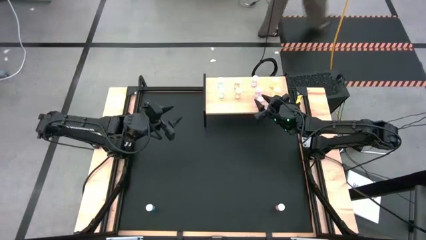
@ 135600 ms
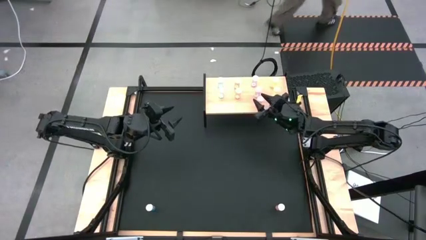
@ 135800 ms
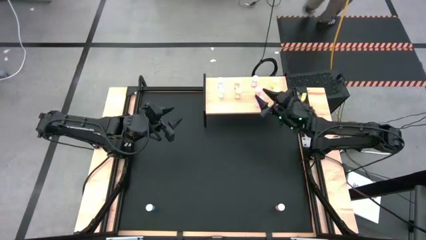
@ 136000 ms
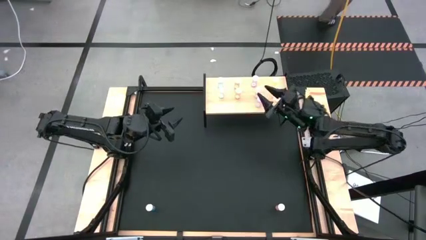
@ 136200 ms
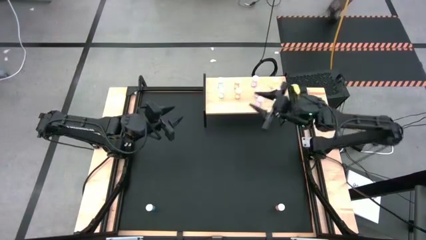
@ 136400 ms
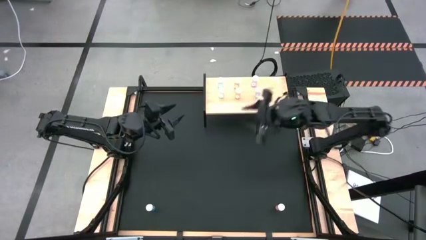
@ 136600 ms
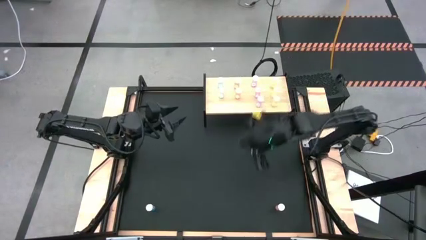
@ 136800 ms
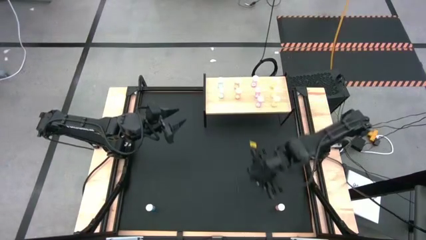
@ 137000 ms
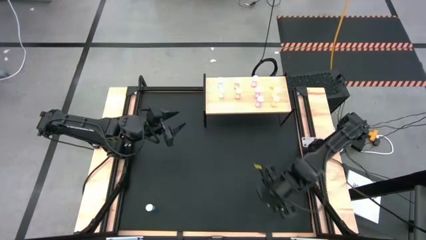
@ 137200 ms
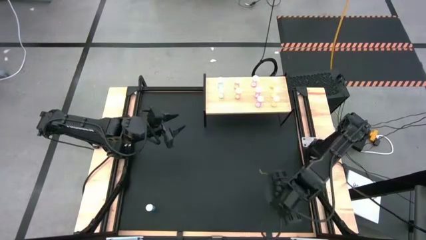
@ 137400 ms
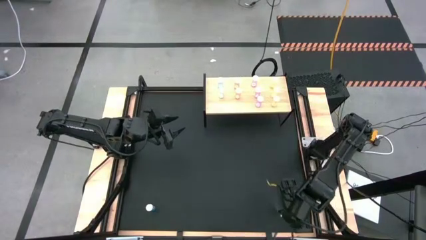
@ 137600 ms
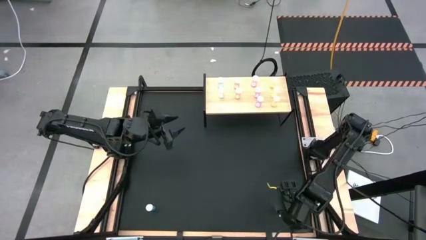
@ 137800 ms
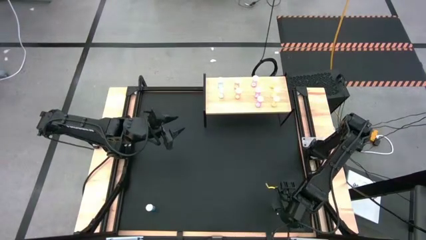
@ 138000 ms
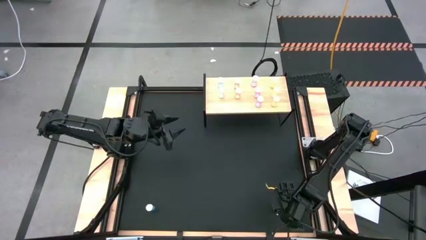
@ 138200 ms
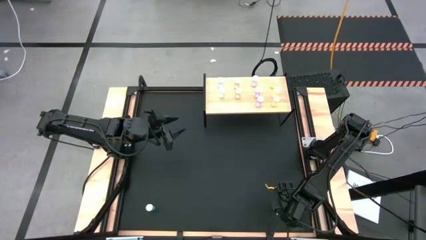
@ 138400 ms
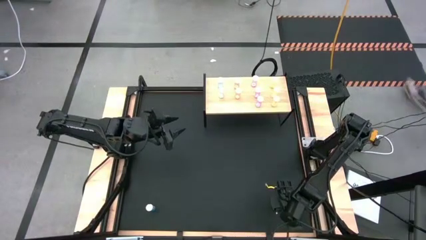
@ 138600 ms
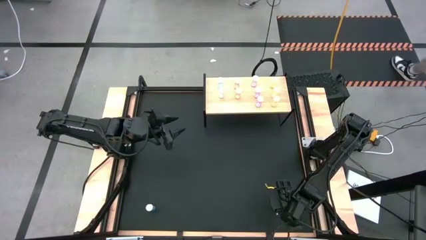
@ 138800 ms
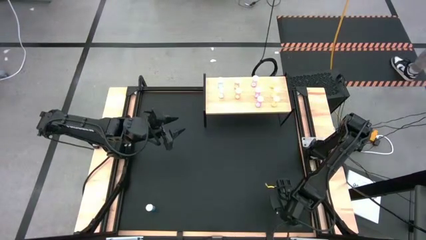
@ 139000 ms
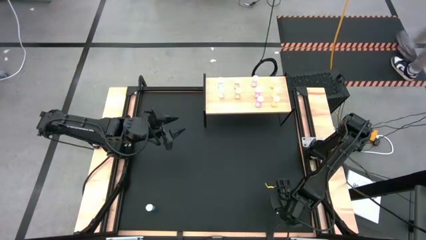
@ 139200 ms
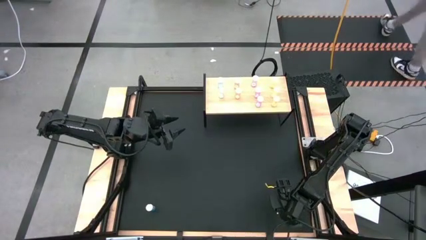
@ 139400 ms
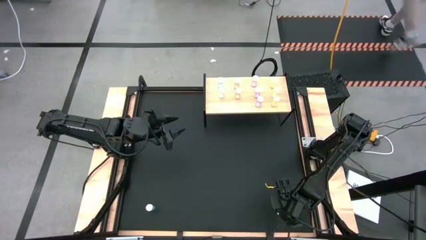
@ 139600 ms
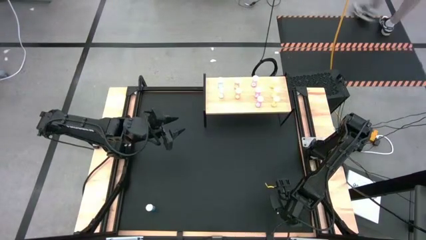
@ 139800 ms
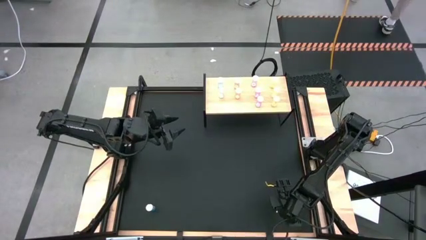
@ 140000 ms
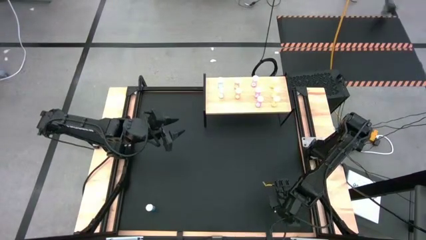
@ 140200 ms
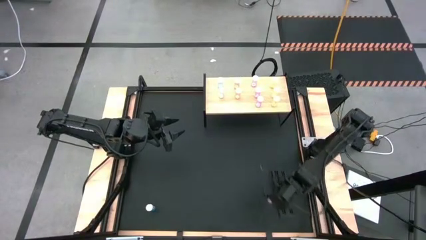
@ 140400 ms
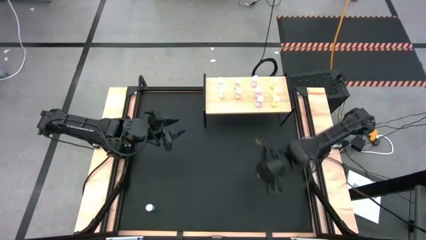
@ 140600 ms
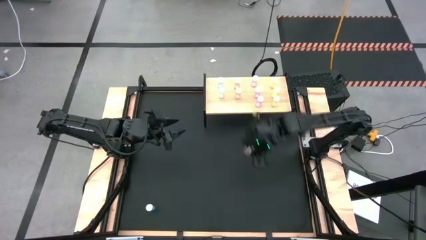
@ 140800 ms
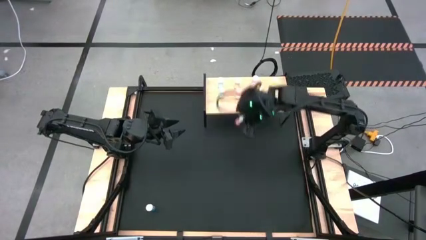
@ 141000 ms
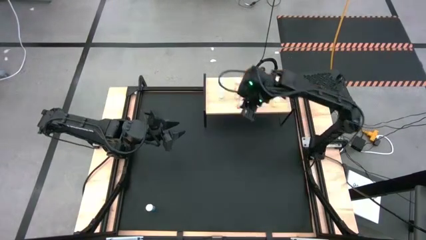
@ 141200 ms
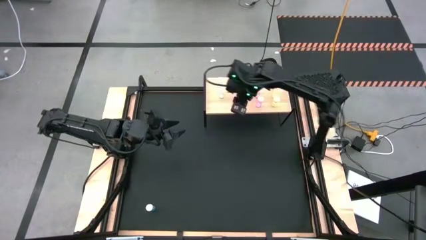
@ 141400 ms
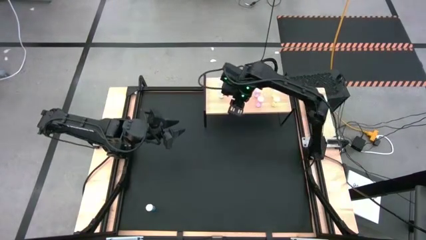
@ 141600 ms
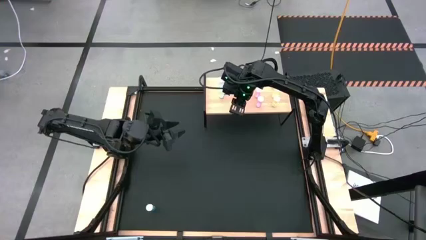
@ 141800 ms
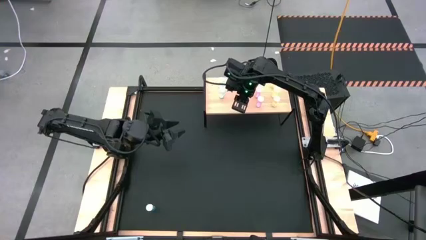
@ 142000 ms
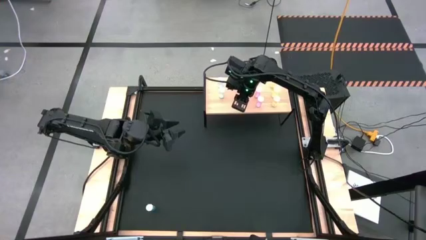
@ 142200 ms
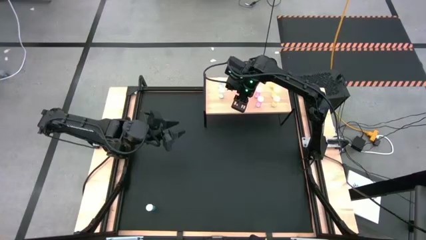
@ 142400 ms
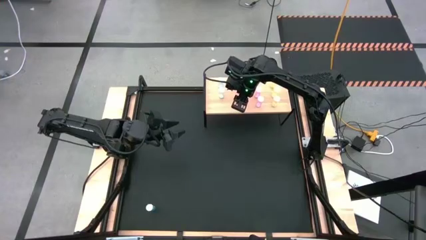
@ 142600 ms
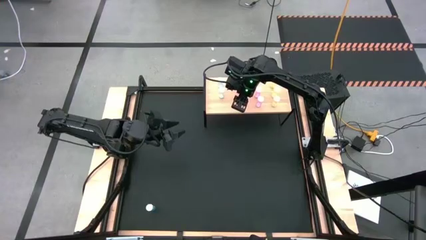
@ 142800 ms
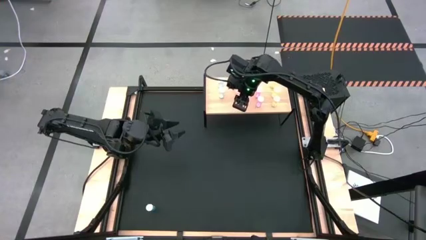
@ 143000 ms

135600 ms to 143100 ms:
Task: Pick and place medicine bottles onto shelf by color
Put the orange pill bottle on the shelf aligned with the other orange pill bottles

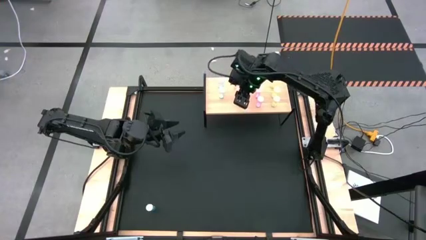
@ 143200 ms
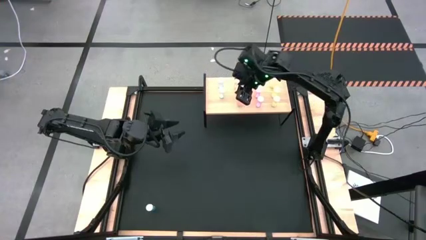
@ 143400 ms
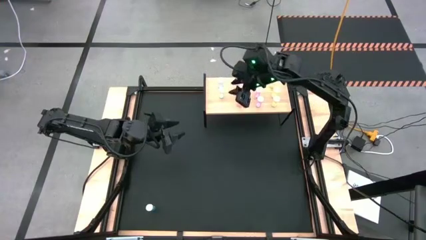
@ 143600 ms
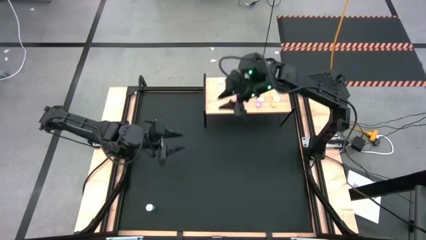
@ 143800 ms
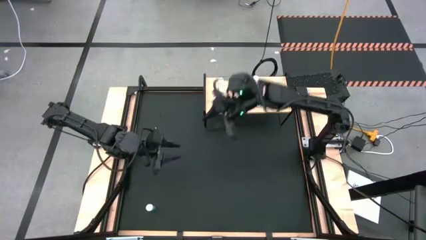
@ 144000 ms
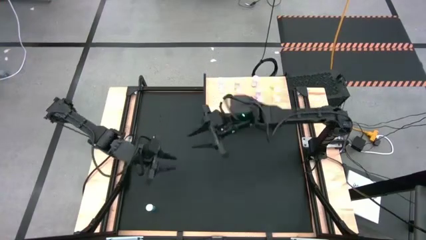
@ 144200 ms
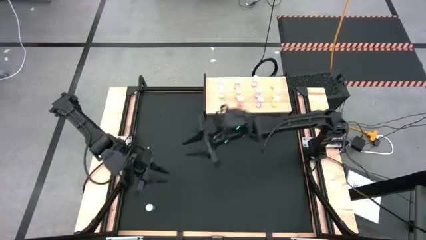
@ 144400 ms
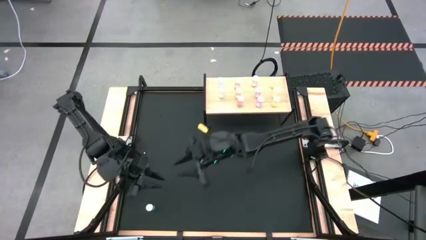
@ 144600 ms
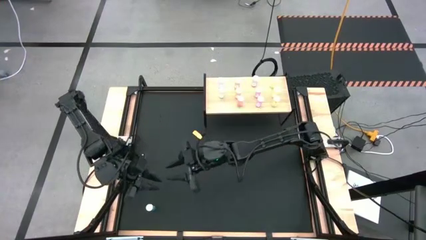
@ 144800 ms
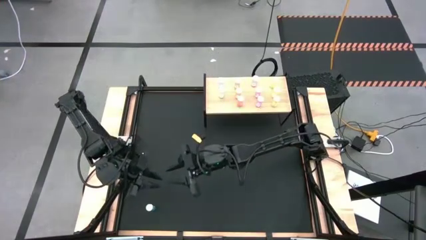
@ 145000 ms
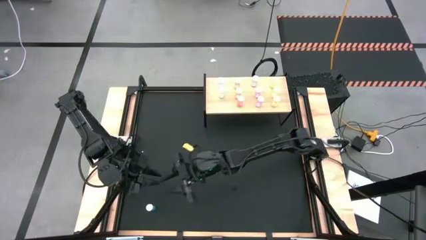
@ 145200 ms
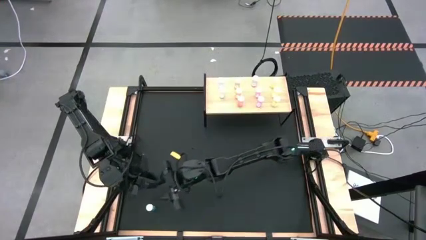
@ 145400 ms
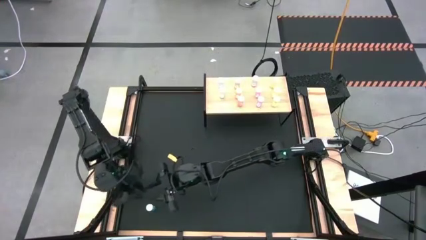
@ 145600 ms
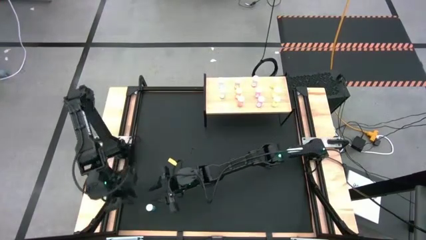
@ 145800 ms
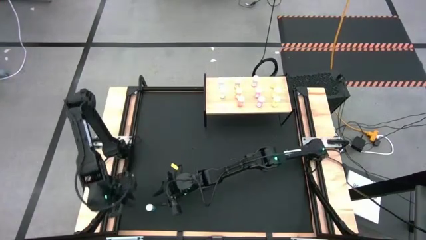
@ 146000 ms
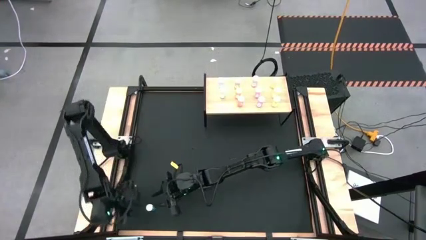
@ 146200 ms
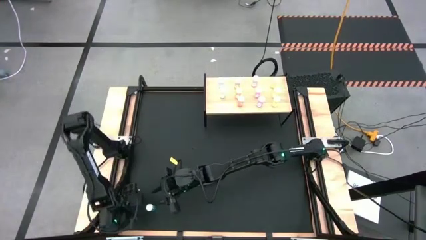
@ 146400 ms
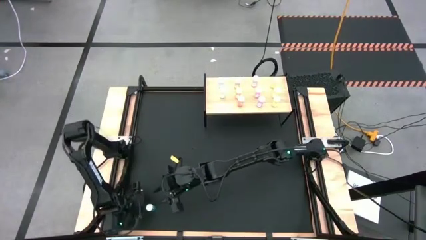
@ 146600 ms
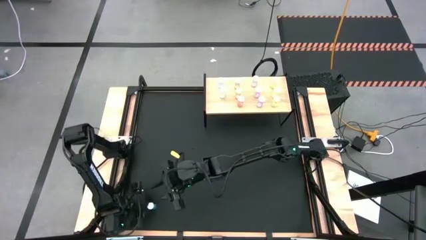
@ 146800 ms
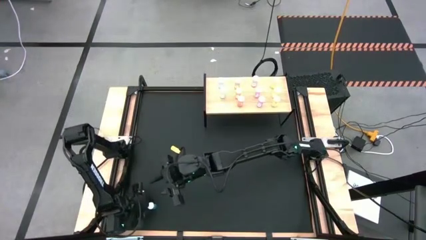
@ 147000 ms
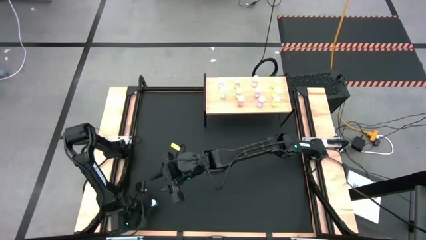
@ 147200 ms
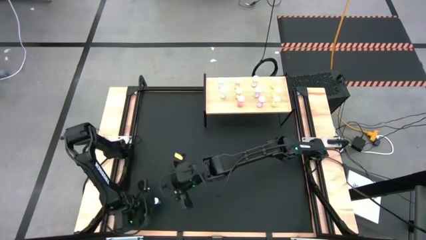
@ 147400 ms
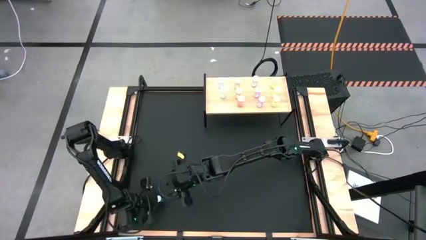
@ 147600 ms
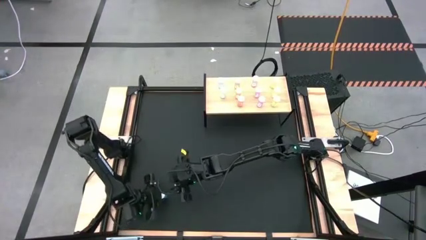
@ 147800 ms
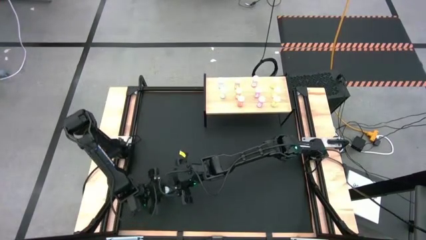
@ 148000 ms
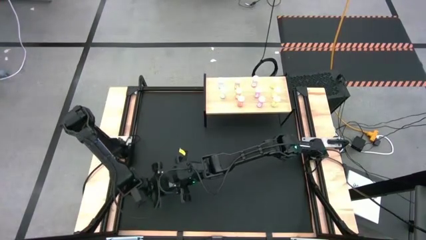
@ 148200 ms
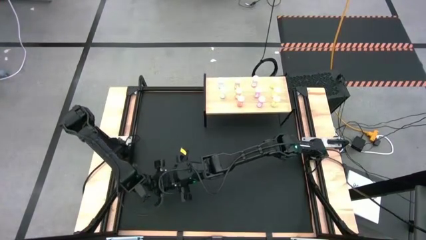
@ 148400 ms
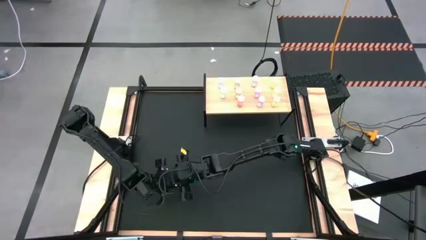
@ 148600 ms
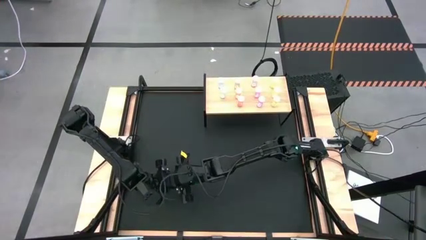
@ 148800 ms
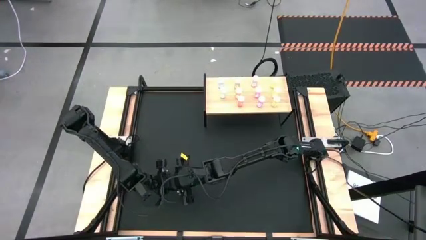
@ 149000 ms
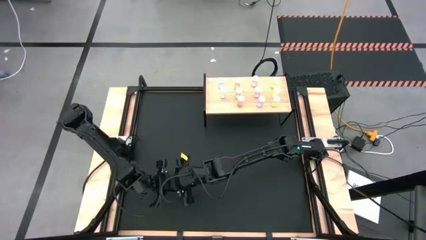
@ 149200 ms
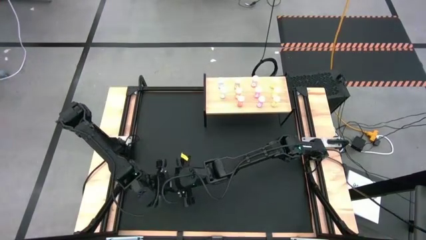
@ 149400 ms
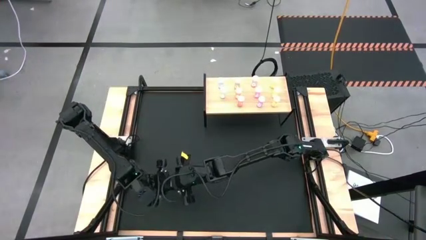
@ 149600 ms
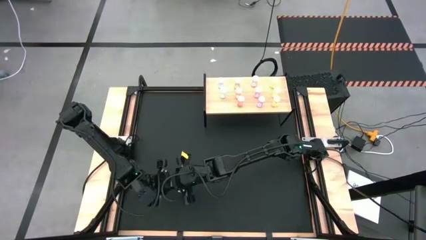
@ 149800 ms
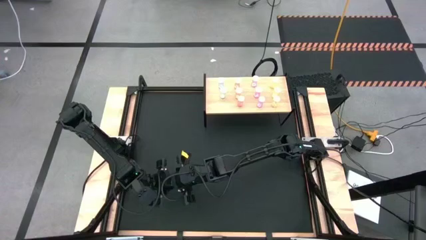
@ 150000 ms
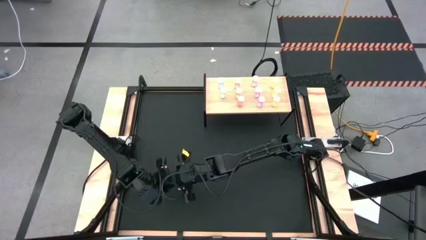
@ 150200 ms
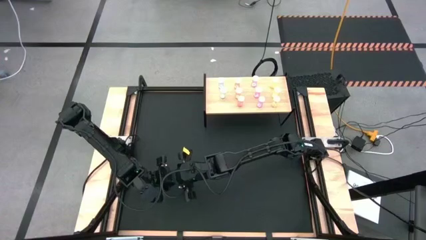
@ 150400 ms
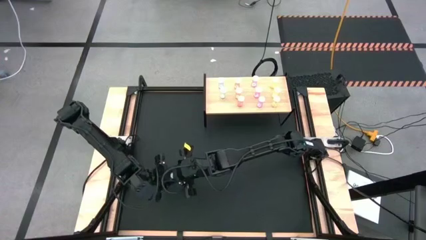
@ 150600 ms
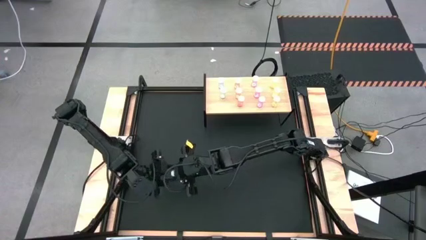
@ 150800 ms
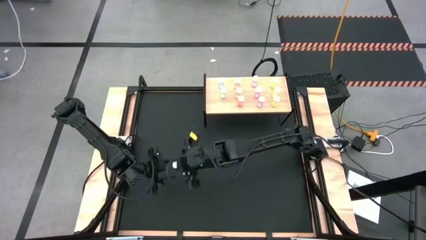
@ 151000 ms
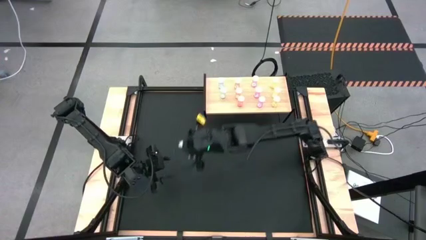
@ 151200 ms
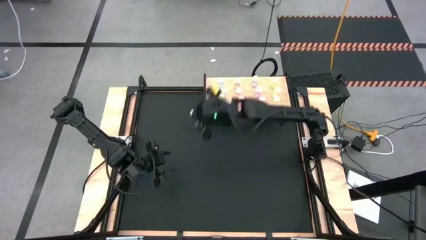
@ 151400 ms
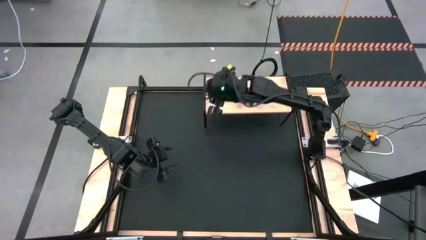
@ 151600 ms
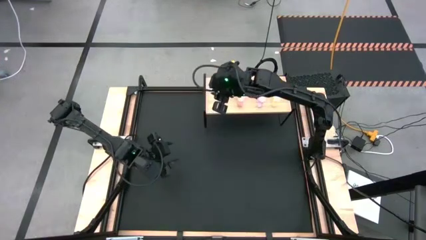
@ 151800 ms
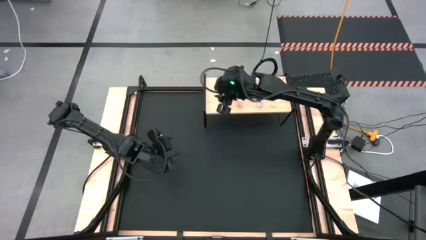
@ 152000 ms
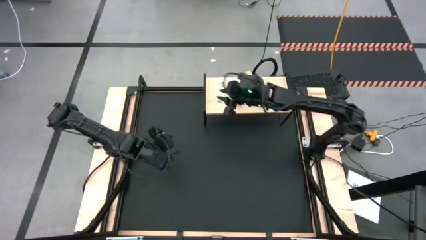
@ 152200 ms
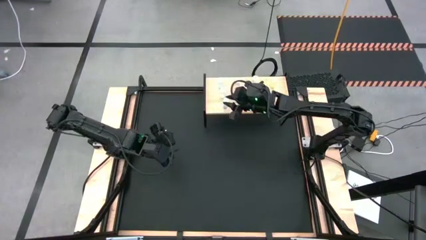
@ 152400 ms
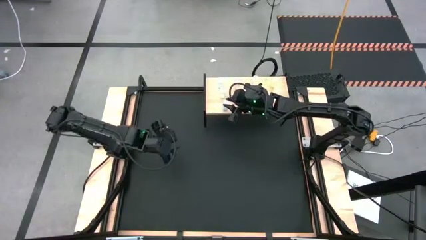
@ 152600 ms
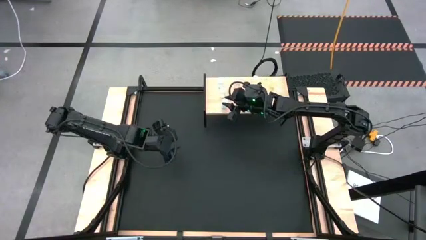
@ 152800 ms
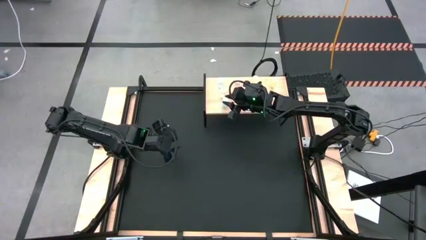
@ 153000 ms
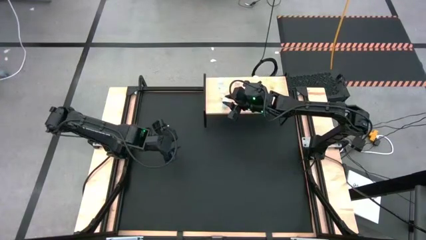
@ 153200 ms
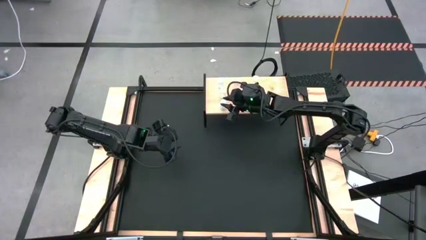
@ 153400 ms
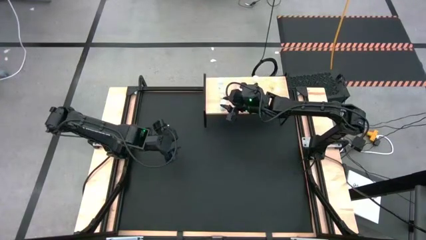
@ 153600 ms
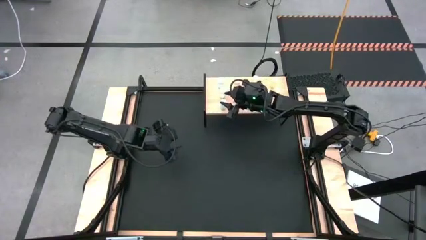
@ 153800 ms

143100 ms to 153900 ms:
Put the blue pill bottle on the shelf aligned with the other blue pill bottles
